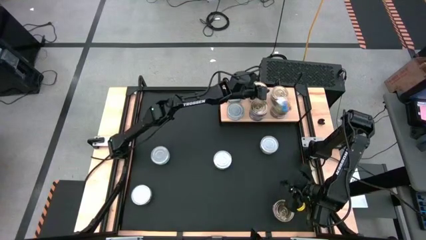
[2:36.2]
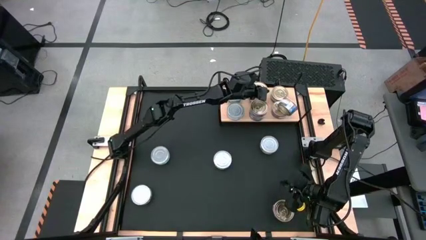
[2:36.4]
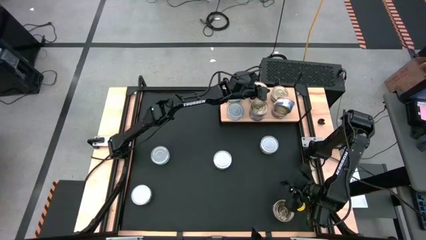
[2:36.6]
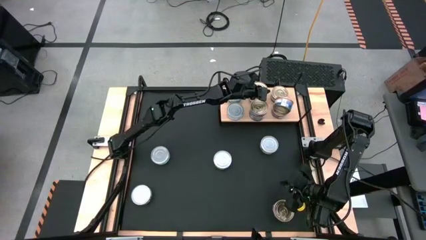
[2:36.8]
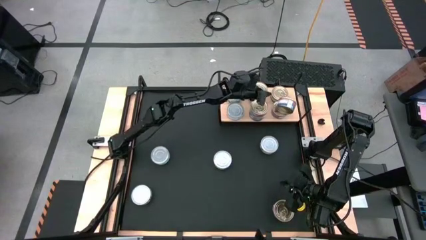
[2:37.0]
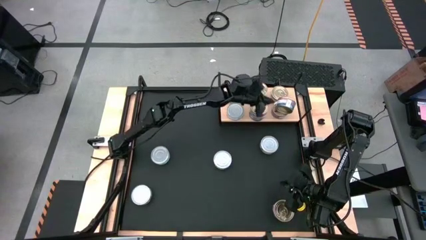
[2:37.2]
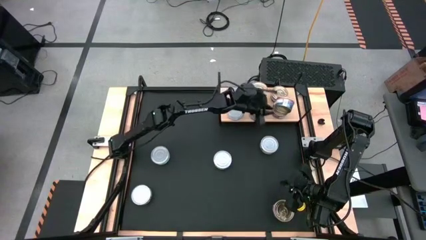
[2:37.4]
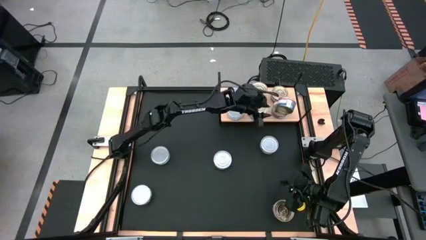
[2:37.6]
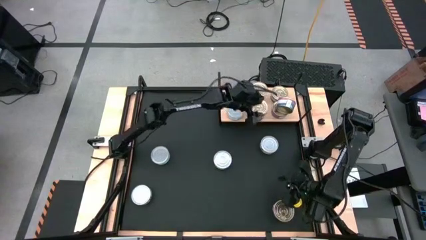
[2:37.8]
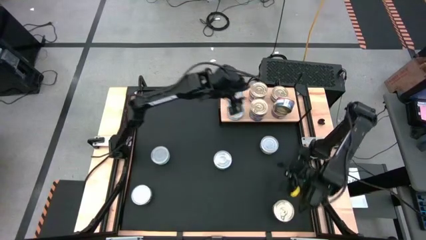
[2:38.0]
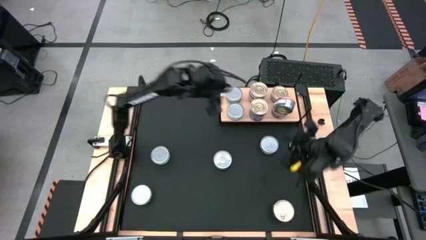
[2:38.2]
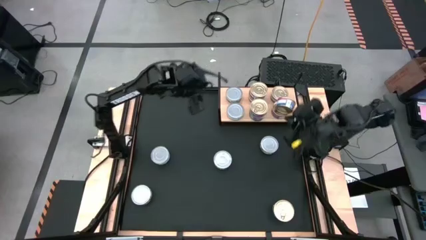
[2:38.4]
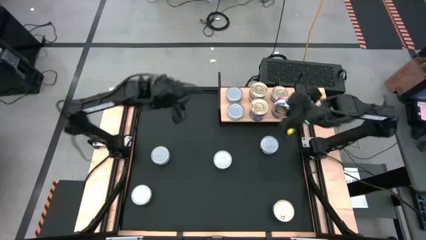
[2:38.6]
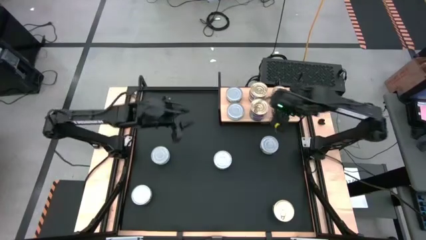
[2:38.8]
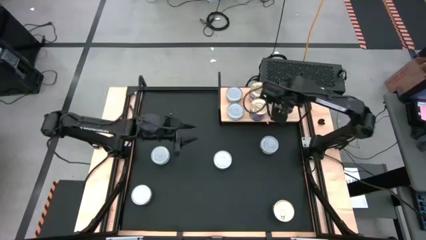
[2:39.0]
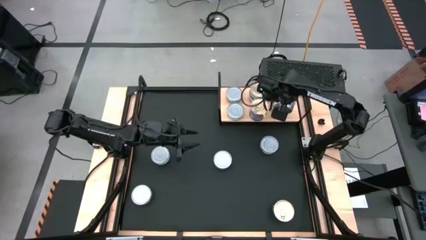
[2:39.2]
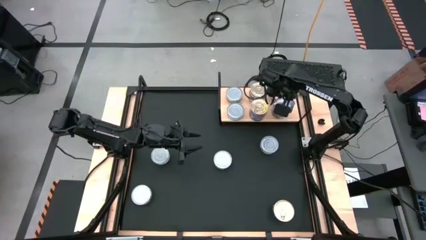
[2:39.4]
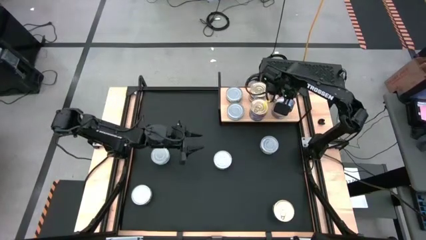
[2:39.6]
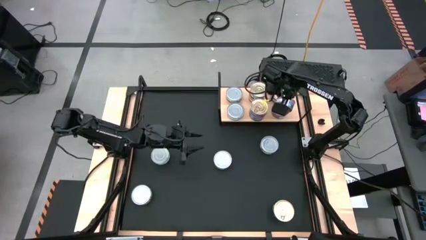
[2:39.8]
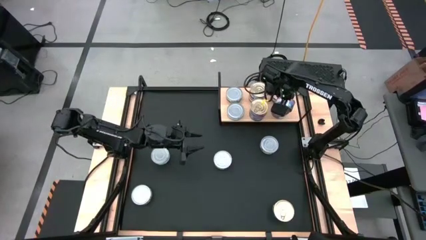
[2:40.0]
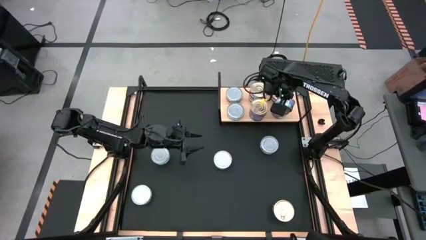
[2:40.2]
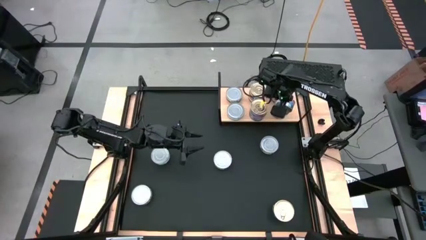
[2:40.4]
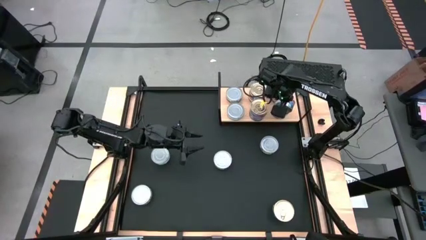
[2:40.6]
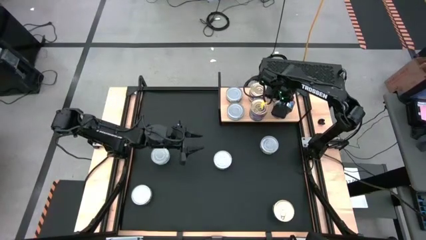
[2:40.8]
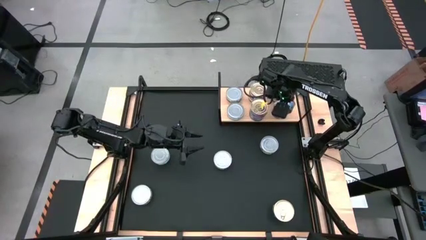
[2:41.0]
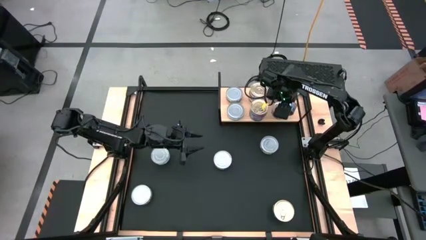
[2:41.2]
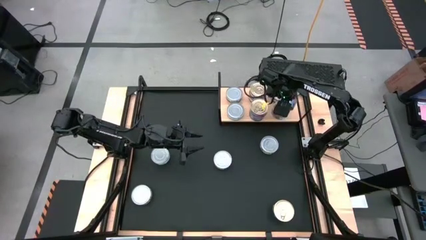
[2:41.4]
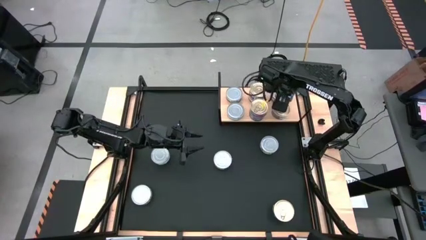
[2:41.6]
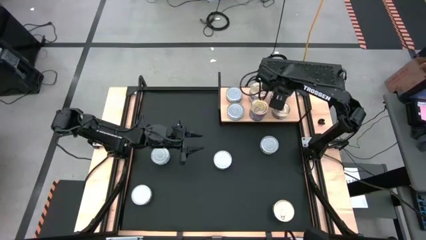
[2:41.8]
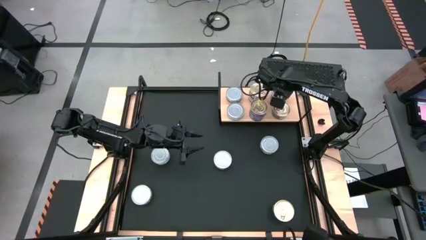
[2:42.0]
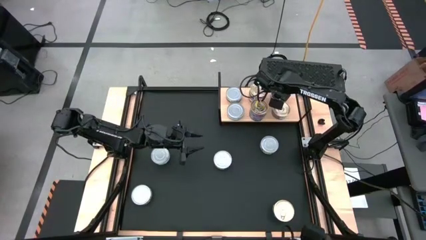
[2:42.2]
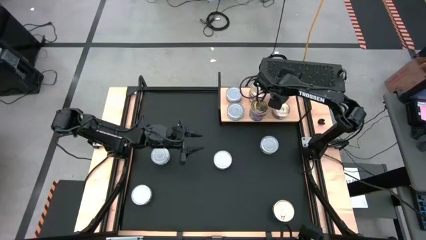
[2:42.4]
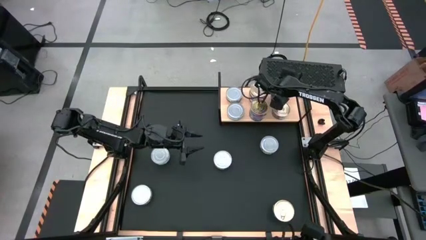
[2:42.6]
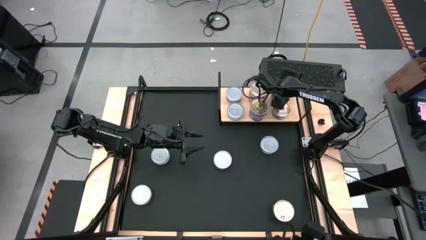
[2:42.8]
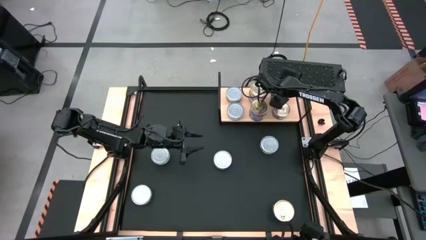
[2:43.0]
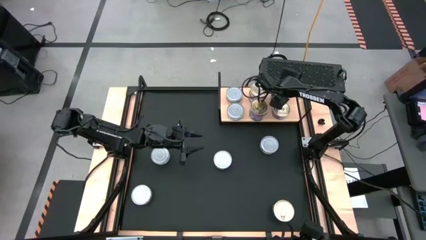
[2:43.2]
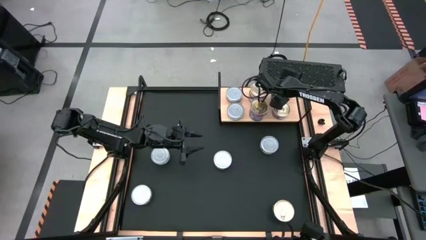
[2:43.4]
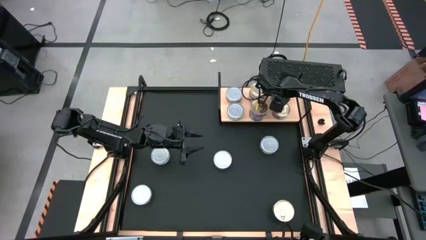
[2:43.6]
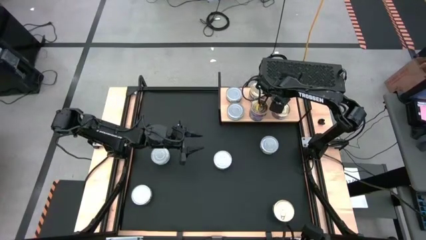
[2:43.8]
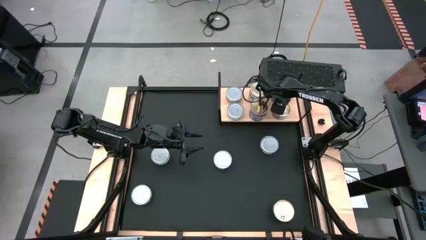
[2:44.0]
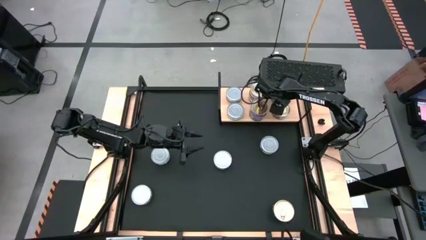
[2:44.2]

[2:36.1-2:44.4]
Task: Stack canned seafood by type on shelf
Stack the blue pink tuna can on top of the other blue pink tuna can on the shelf

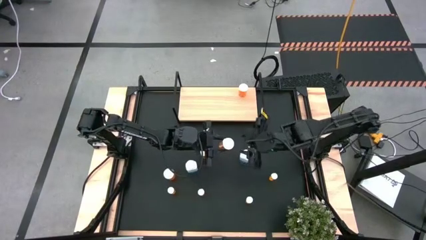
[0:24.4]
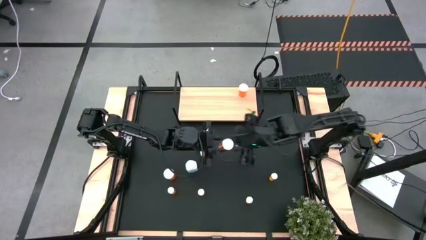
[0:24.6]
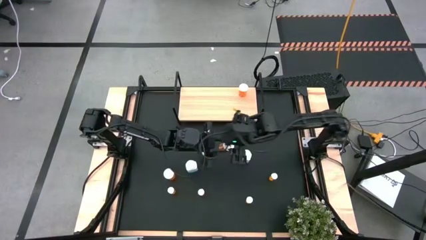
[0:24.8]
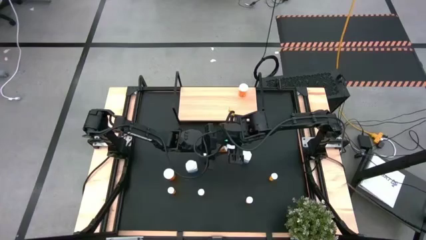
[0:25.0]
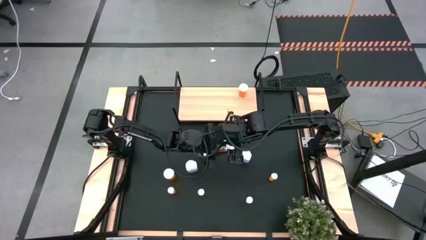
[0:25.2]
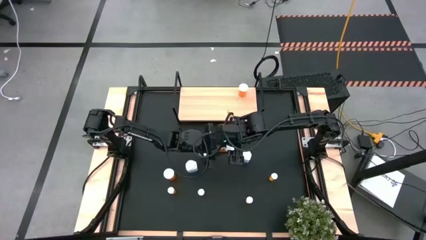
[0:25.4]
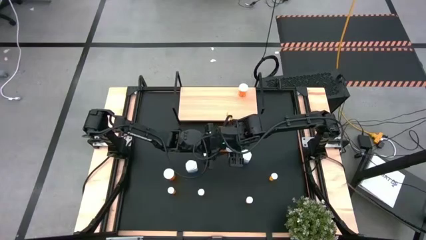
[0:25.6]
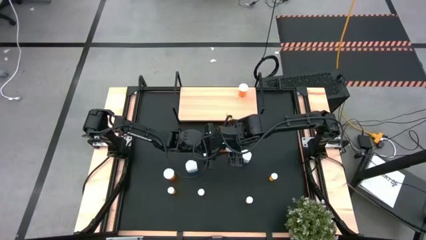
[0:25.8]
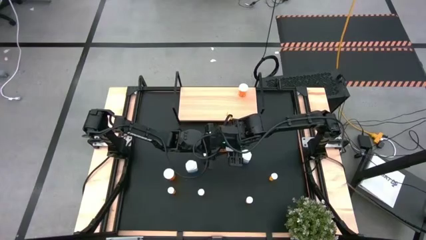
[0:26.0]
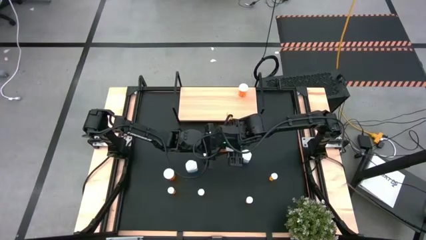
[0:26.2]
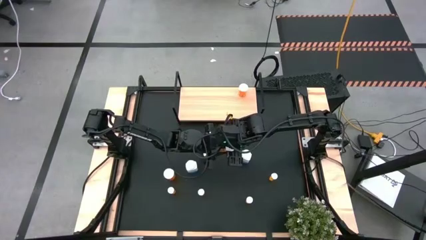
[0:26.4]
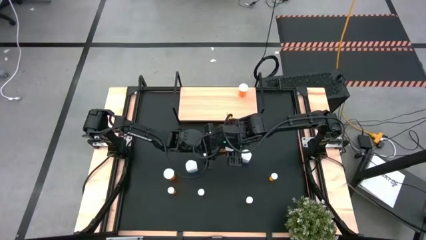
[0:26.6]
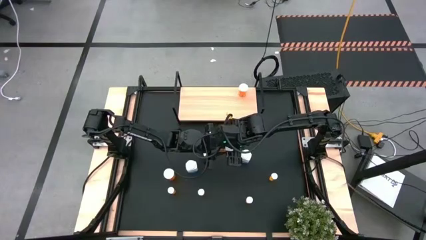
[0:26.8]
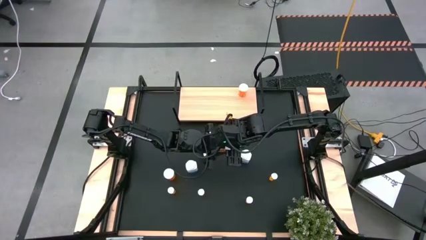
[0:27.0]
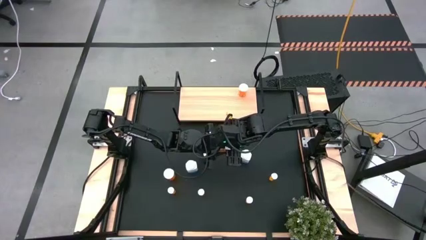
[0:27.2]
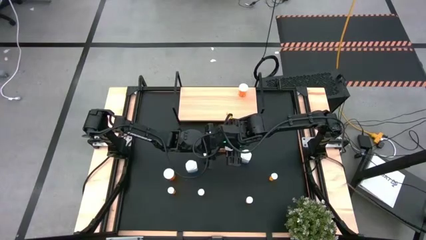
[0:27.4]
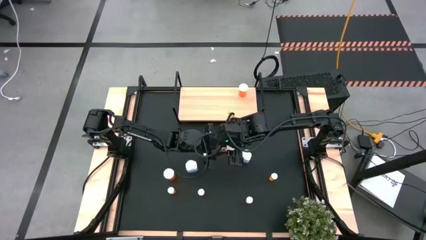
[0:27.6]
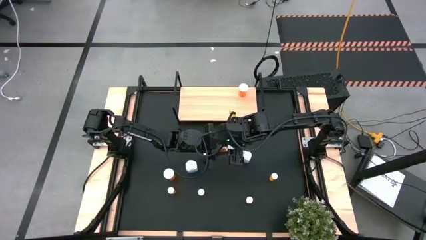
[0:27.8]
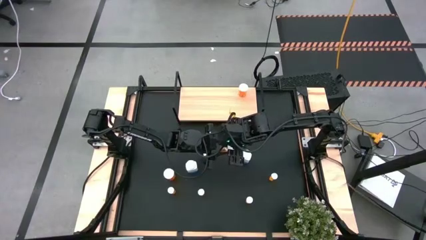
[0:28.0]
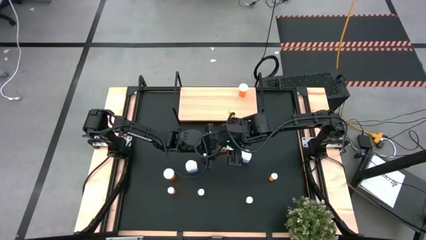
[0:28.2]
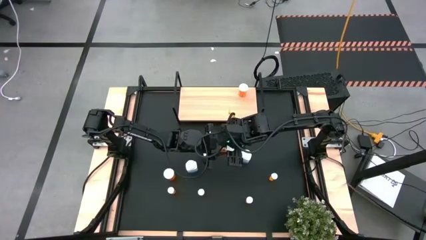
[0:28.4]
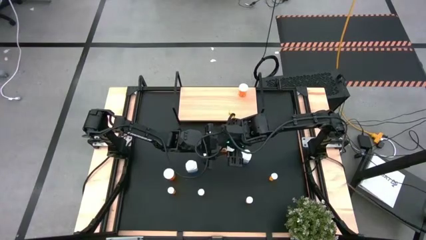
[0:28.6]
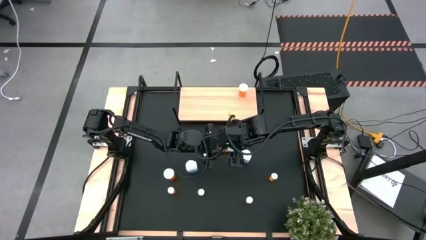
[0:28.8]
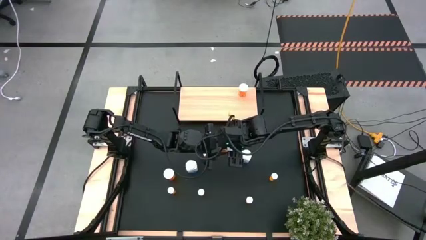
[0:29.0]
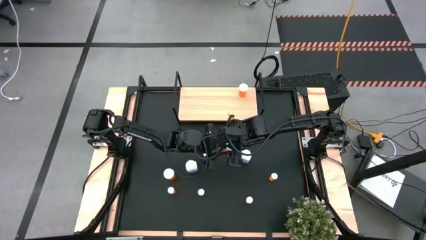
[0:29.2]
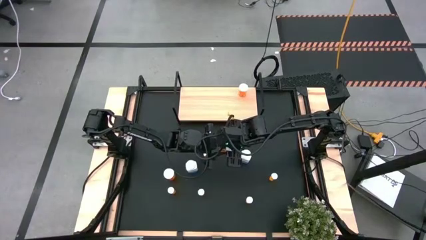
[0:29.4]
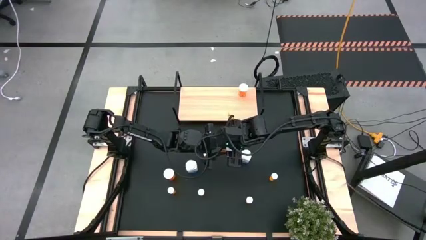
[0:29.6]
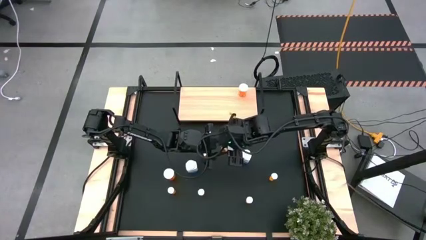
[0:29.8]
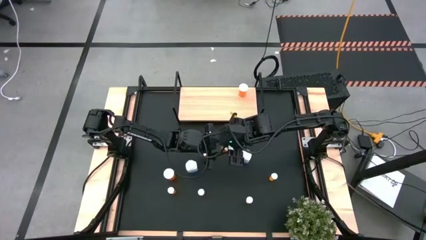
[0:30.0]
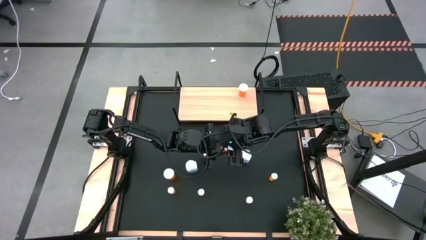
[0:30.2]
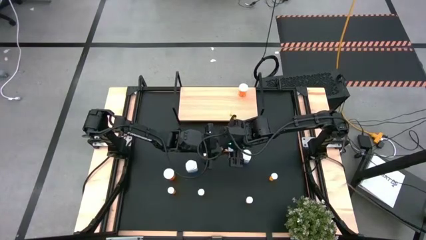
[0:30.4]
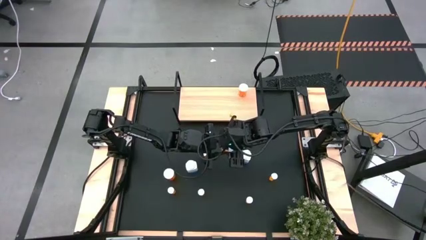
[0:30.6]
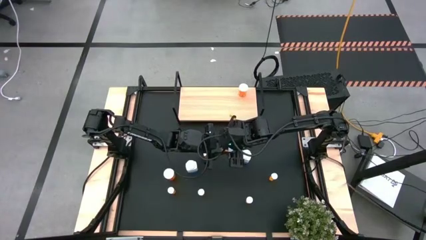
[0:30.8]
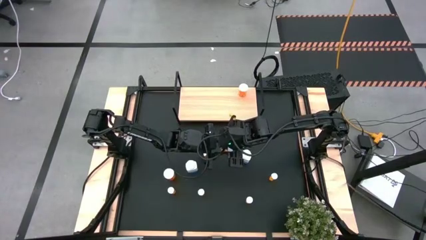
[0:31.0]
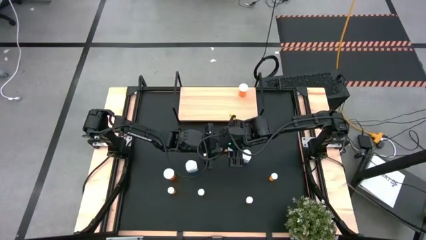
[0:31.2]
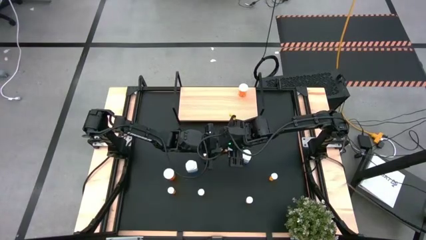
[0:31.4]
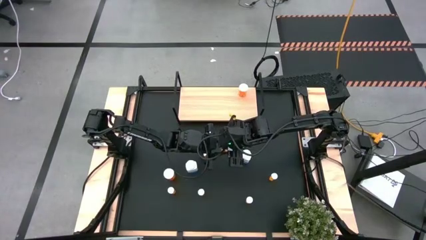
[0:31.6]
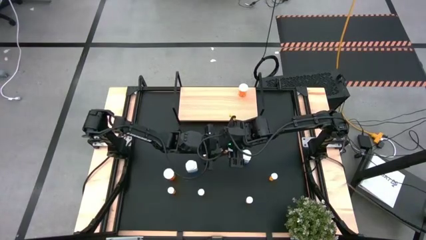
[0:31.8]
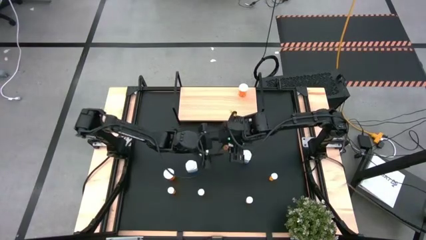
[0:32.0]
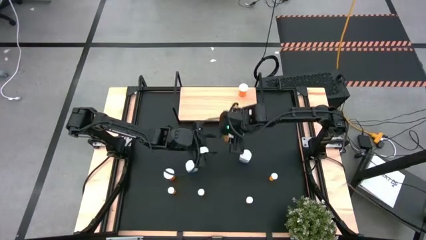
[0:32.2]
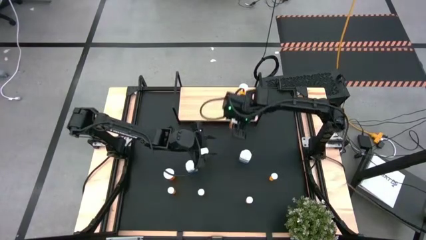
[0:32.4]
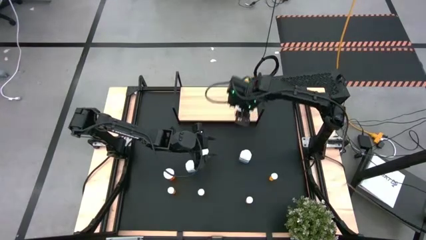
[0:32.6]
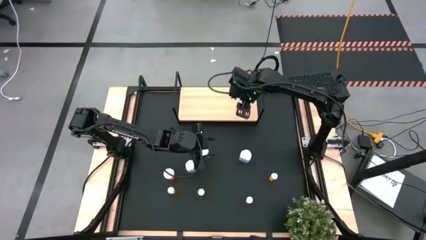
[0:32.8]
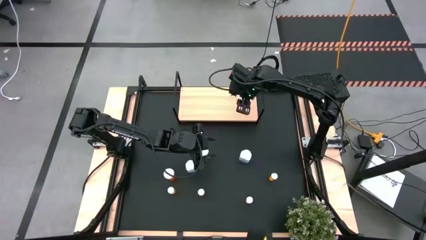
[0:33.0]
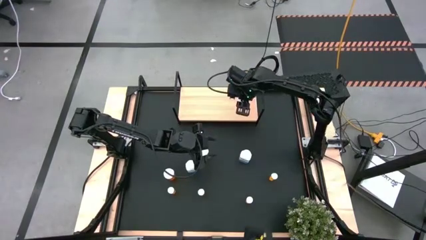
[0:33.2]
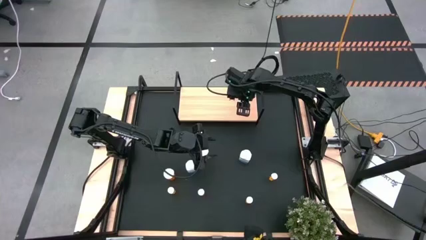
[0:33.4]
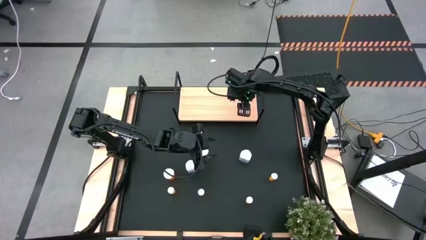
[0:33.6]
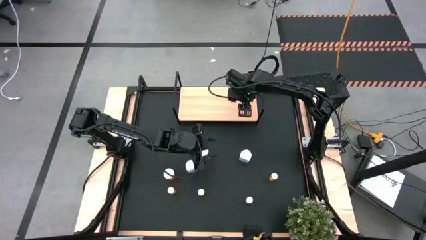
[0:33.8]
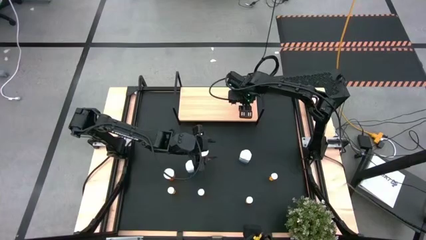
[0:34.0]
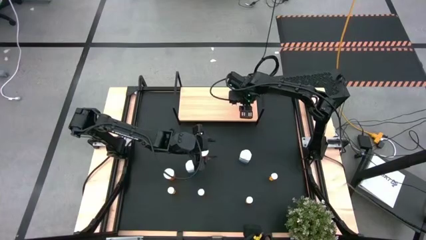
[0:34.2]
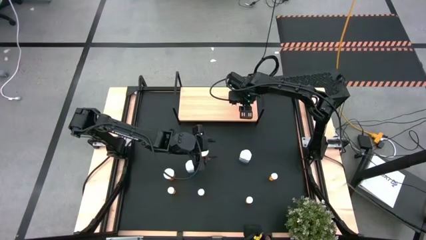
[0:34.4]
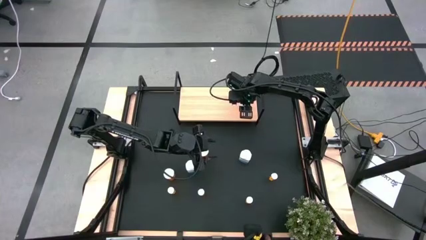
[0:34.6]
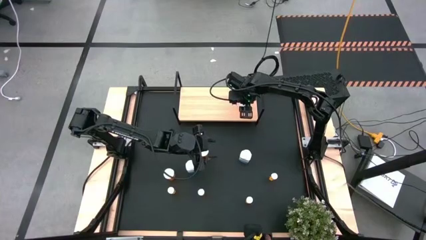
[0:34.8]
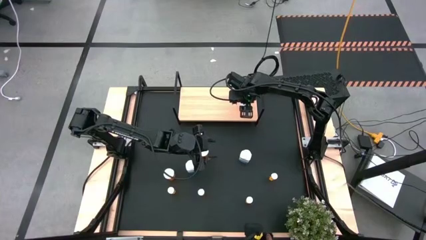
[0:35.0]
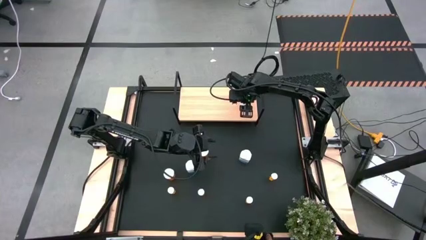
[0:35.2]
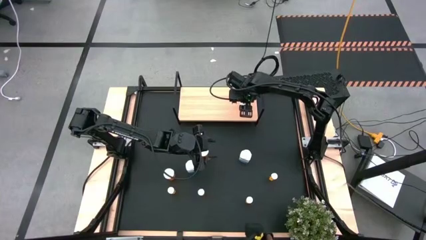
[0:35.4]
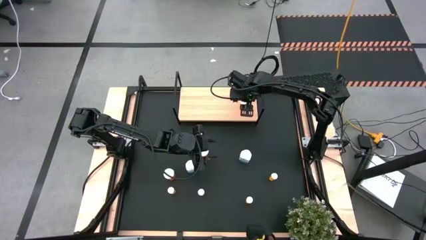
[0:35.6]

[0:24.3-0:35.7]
Task: Pick and place medicine bottles onto shelf by color
Put the bottom right big orange pill bottle aligned with the other big orange pill bottle on the shelf
